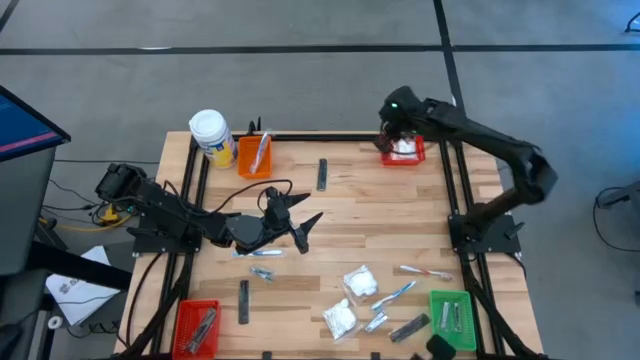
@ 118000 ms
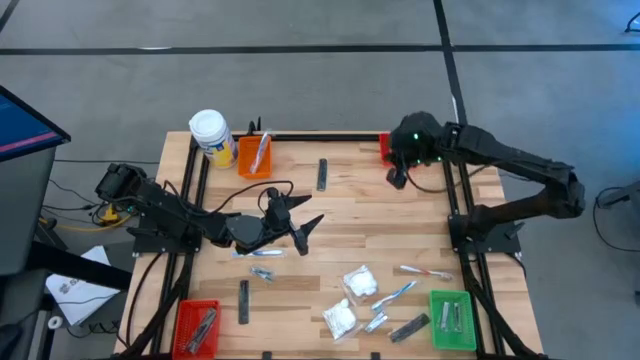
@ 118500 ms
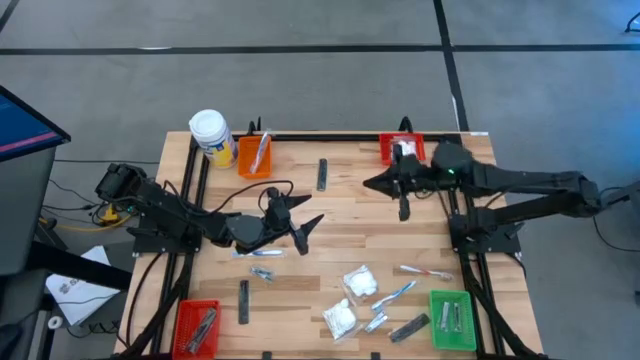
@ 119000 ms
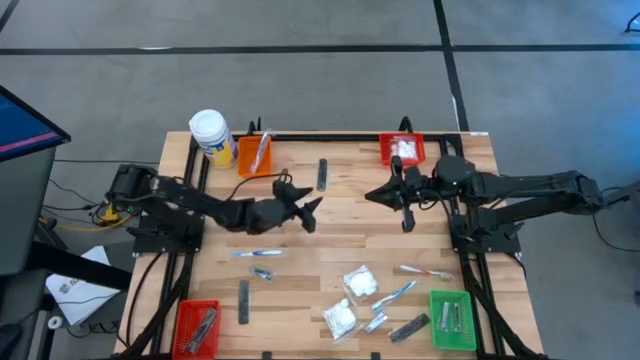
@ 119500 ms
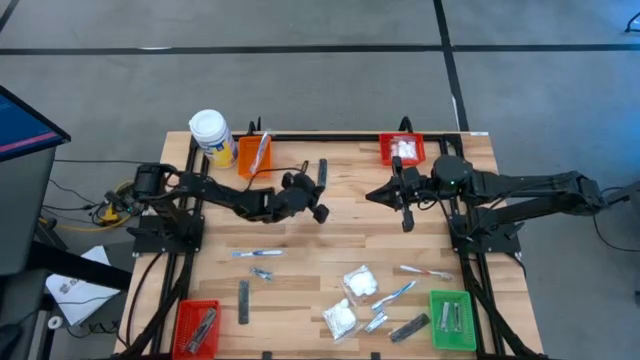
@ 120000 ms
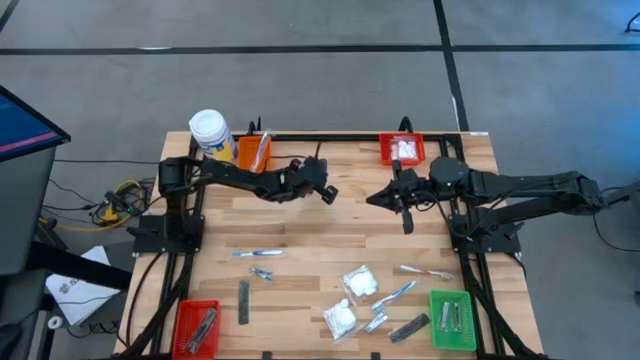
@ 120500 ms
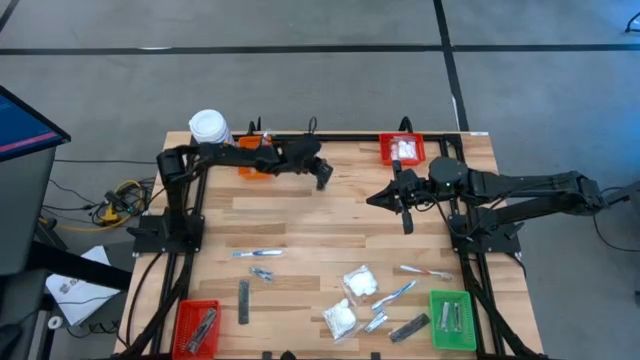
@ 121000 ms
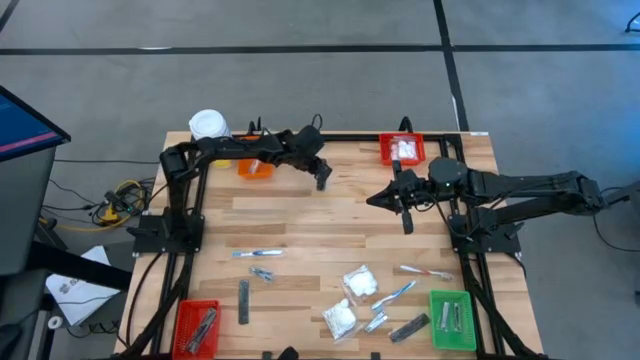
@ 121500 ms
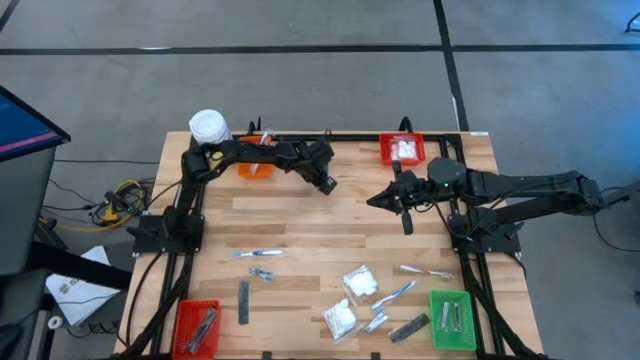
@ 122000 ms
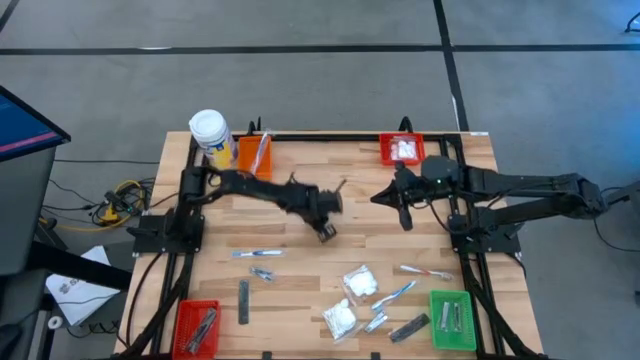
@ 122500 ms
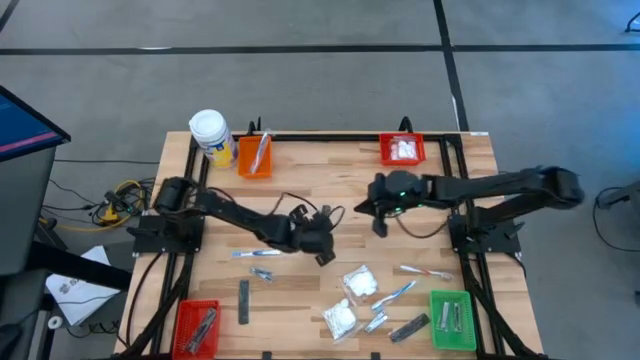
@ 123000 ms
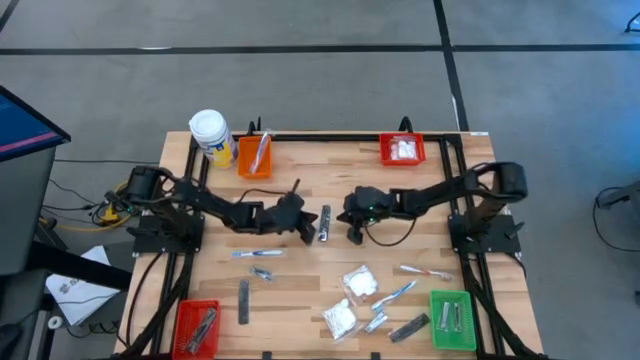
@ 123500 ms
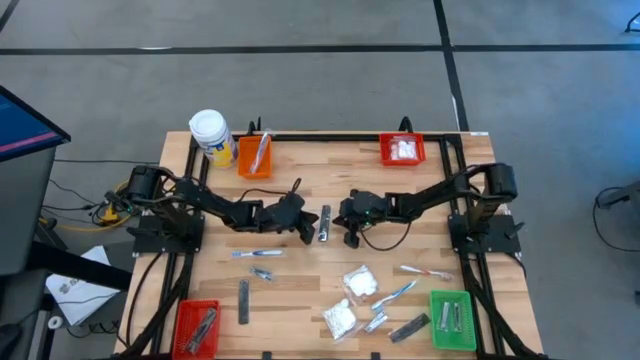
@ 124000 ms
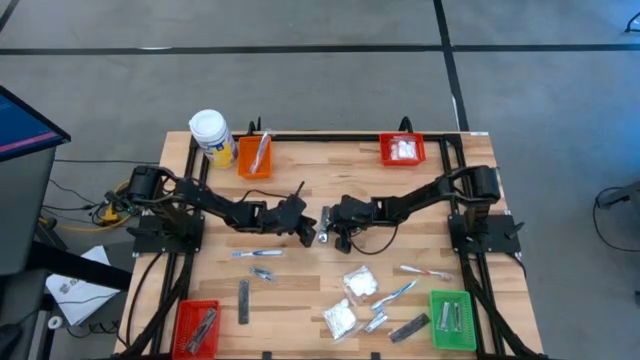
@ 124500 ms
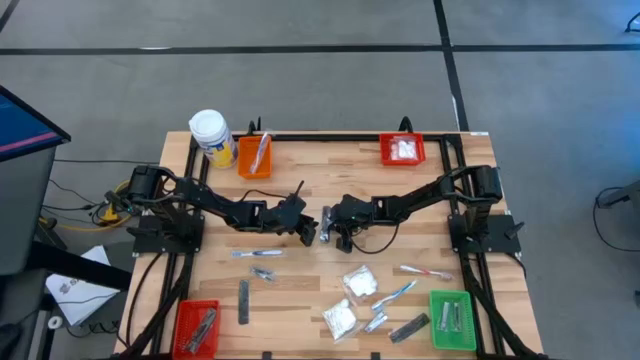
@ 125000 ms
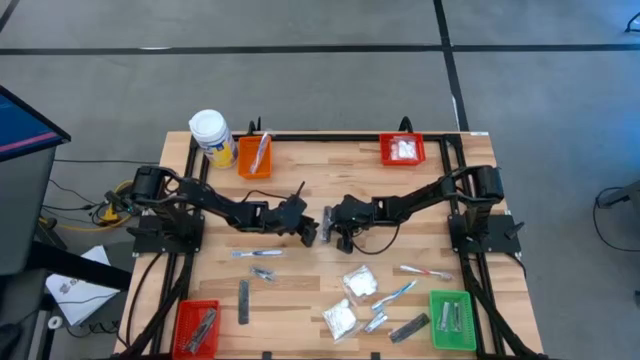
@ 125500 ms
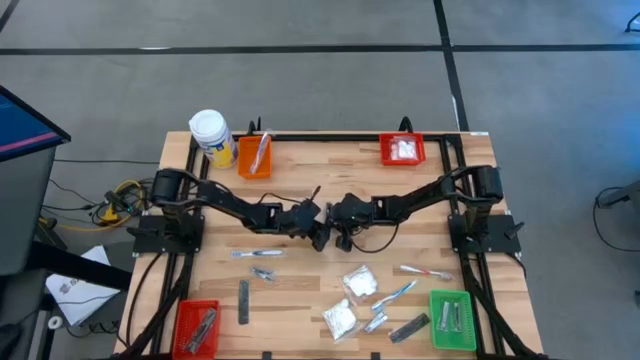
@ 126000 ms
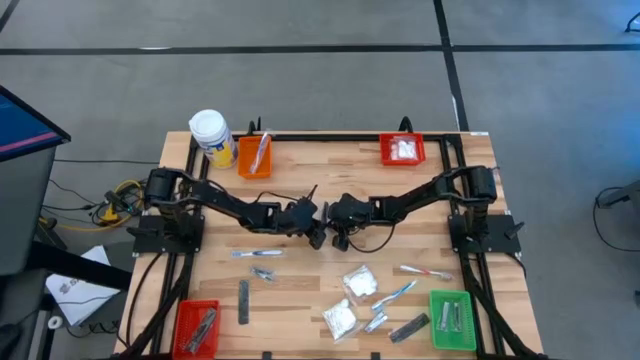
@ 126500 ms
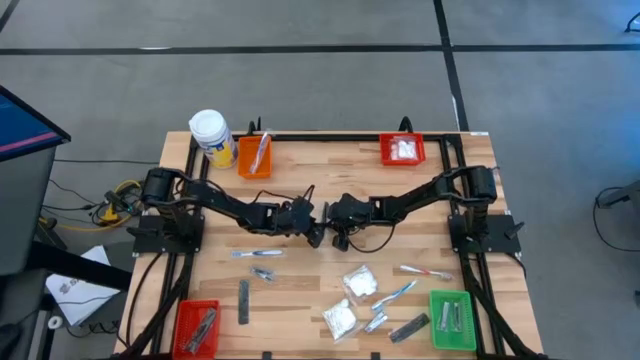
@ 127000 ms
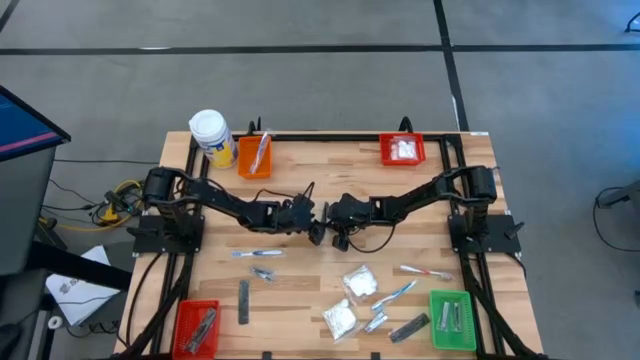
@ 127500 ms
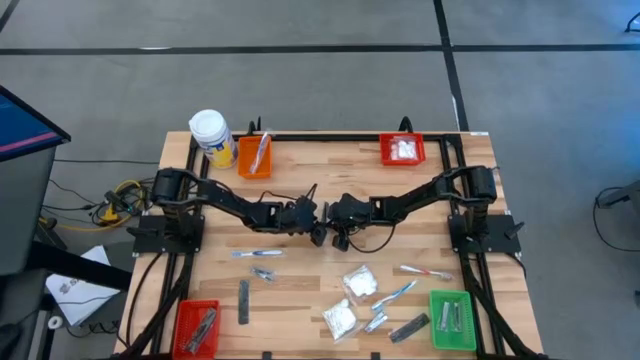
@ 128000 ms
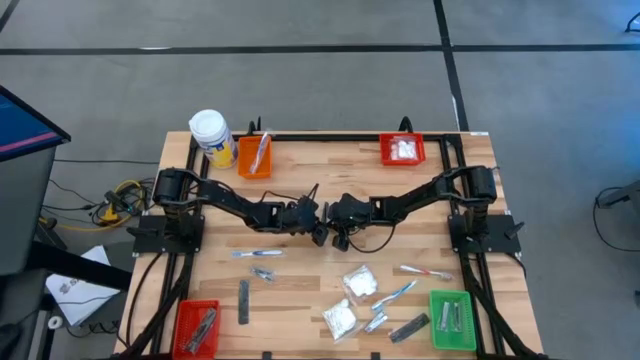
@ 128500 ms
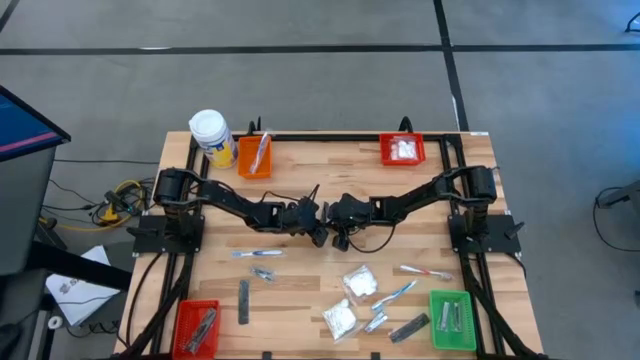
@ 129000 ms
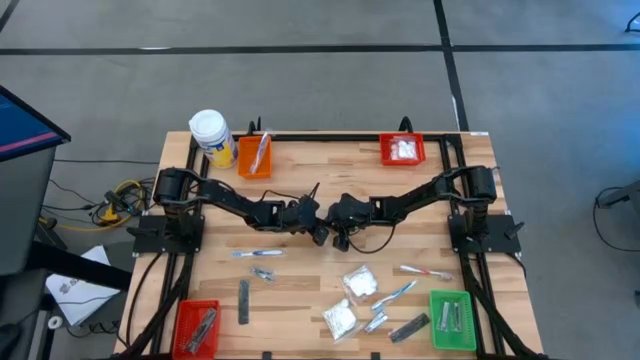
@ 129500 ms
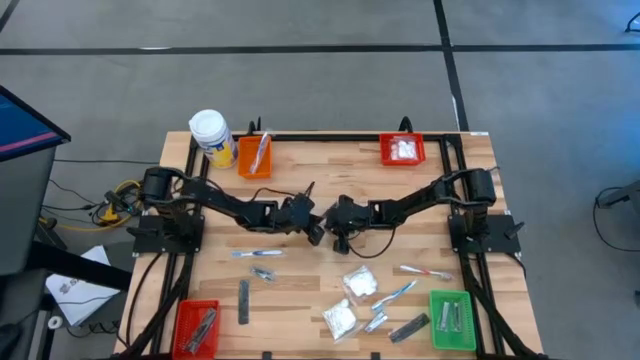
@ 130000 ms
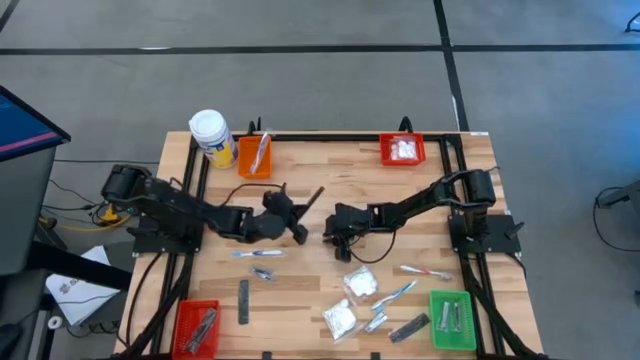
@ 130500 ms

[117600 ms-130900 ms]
Task: Pick & Place Travel size toiletries
Put the top comb into the bottom red bin

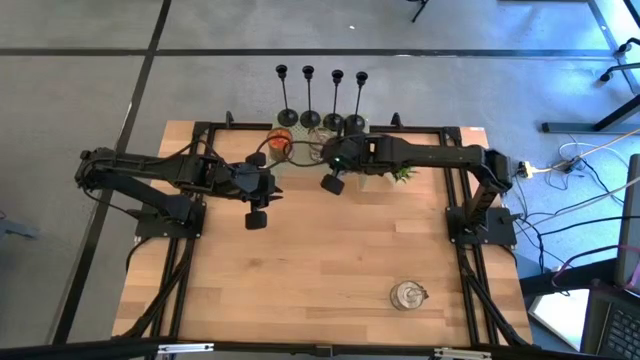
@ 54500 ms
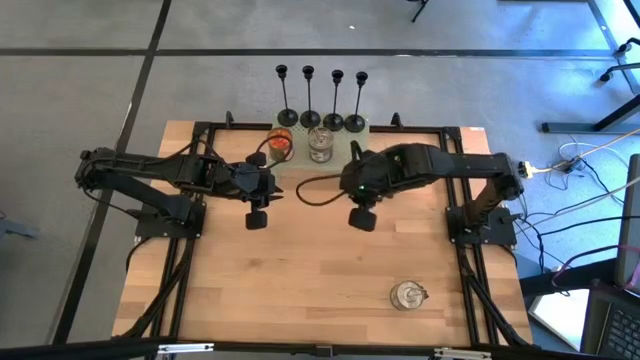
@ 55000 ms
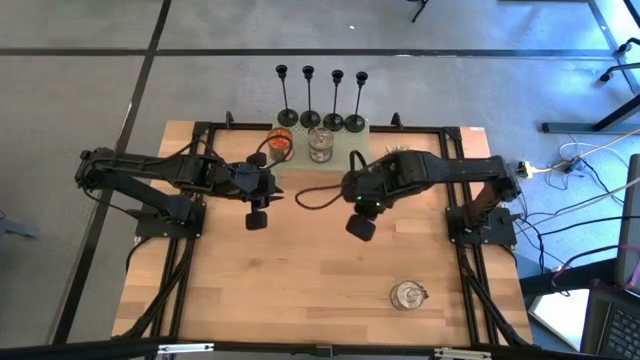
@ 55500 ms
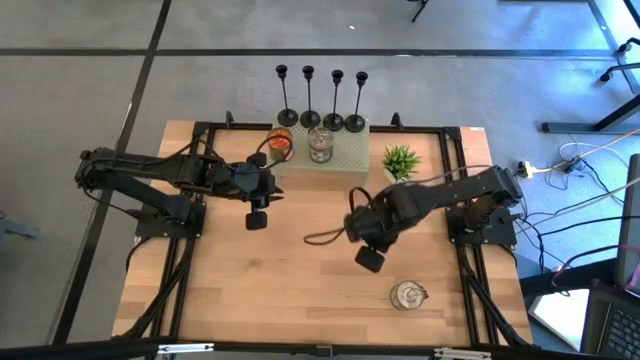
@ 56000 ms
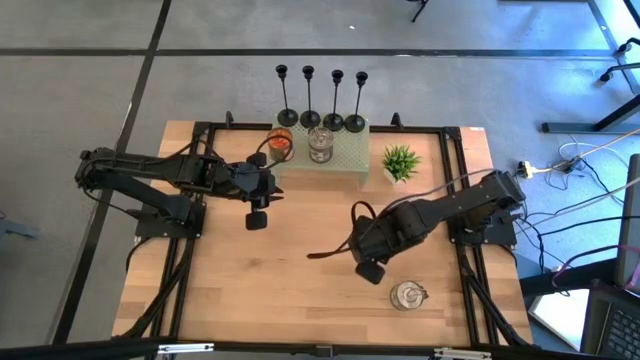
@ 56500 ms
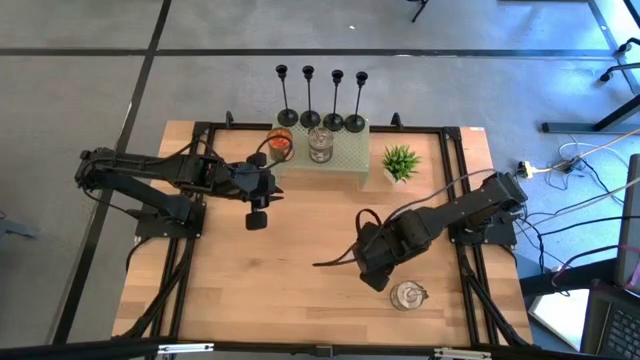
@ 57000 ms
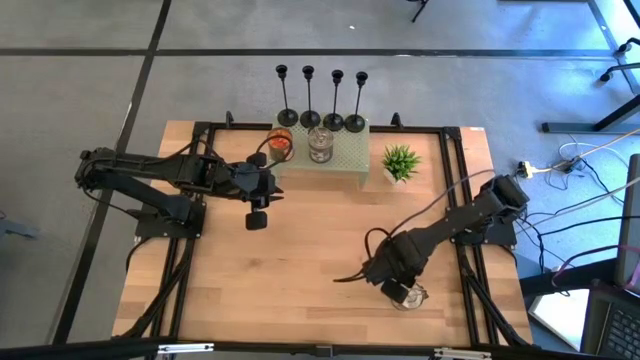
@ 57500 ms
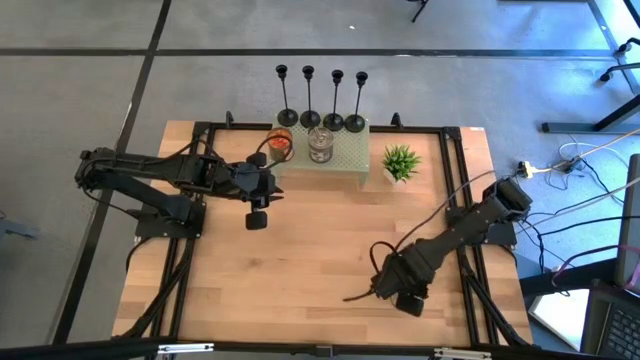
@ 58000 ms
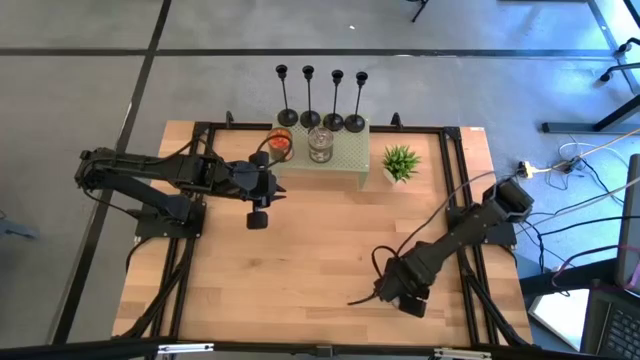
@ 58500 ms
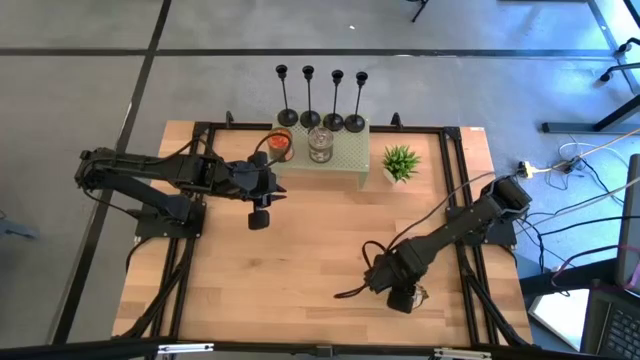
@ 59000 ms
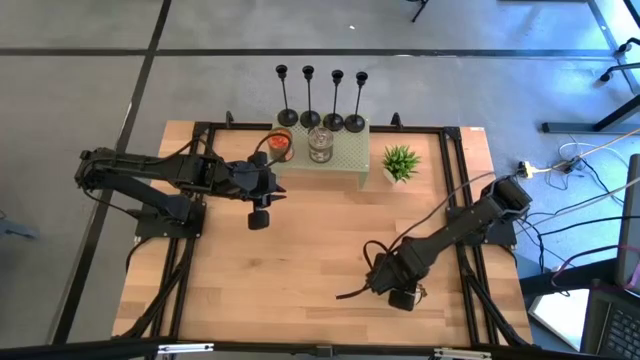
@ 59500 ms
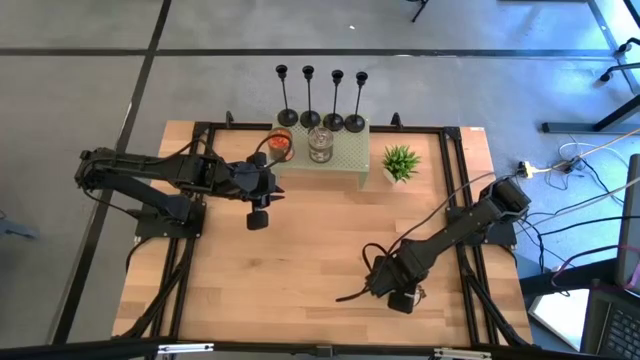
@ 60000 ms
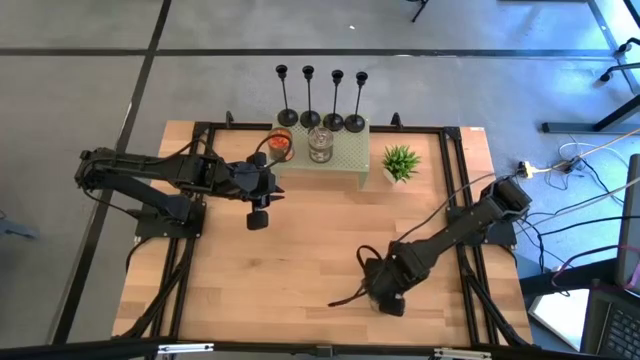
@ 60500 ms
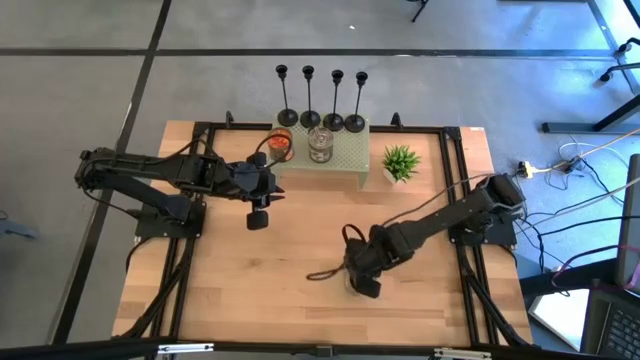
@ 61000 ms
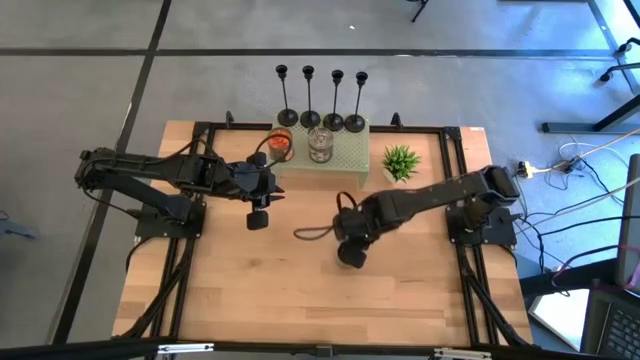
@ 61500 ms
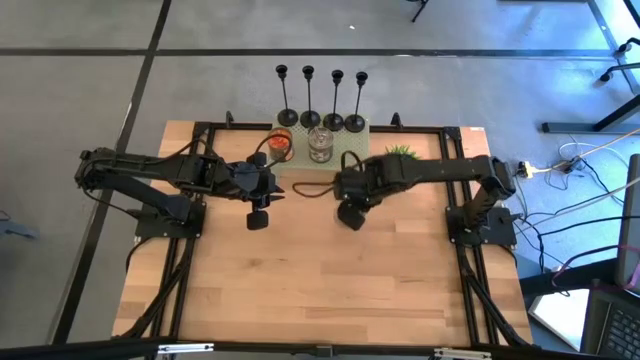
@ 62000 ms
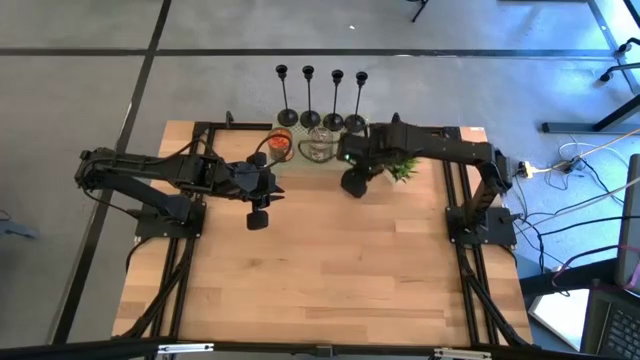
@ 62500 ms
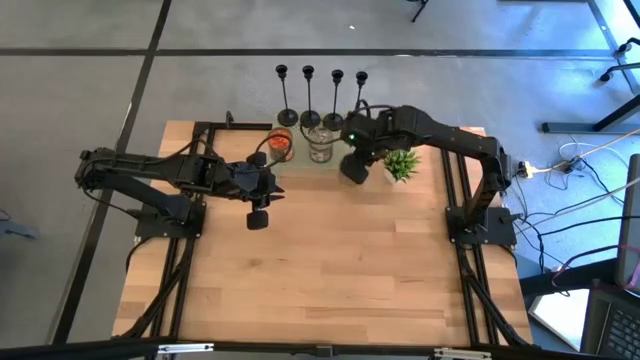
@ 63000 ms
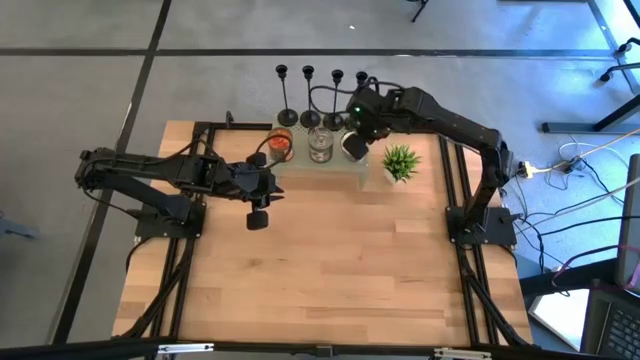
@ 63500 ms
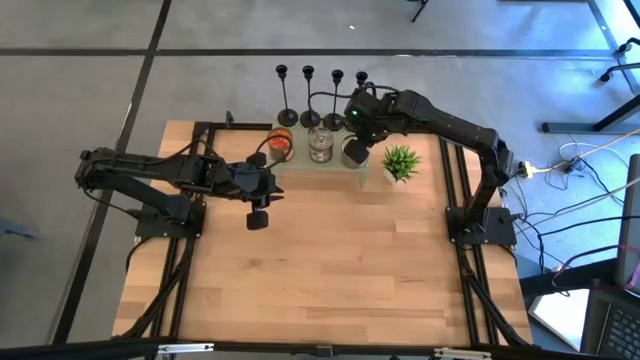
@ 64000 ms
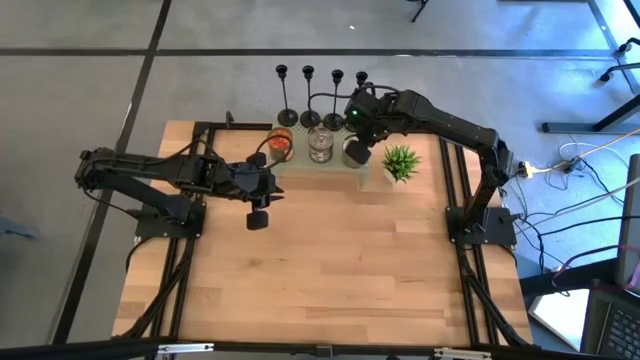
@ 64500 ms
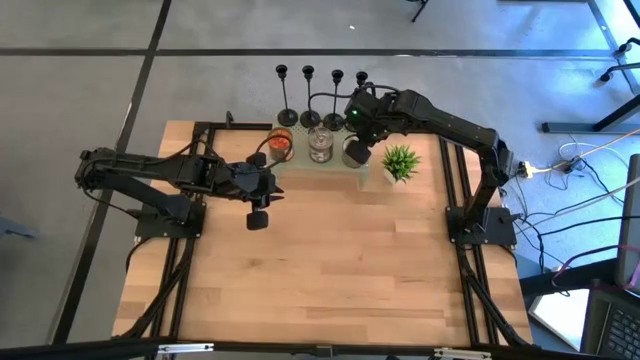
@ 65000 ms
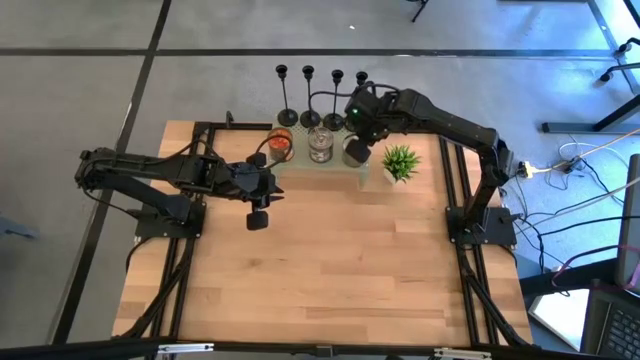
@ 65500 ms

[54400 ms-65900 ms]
Task: Pick & Place candle stick holders
Put the candle on the shelf aligned with the other candles
